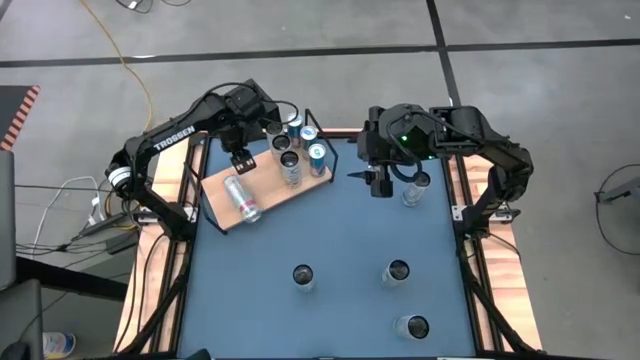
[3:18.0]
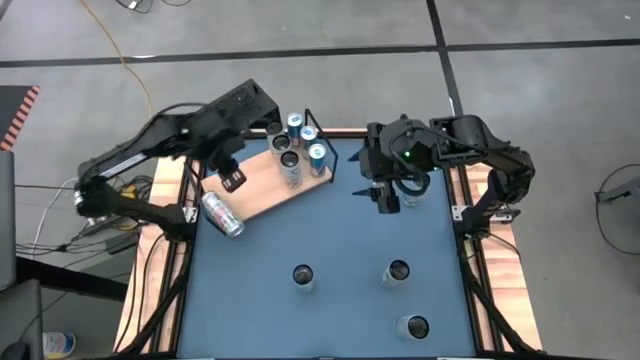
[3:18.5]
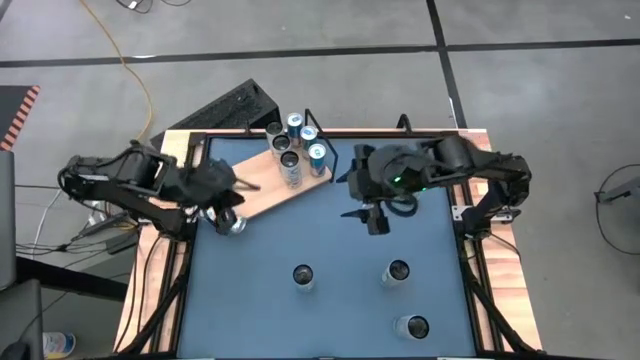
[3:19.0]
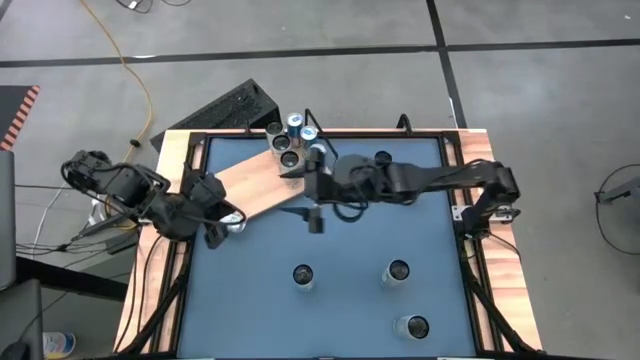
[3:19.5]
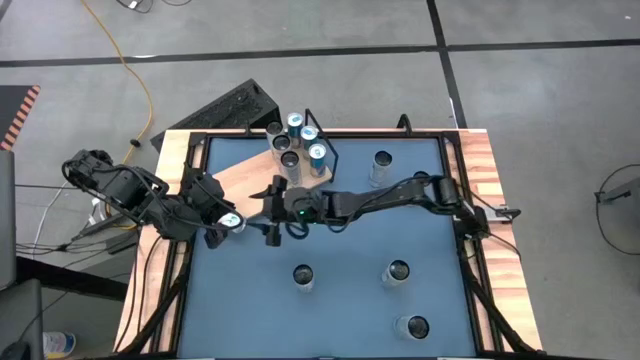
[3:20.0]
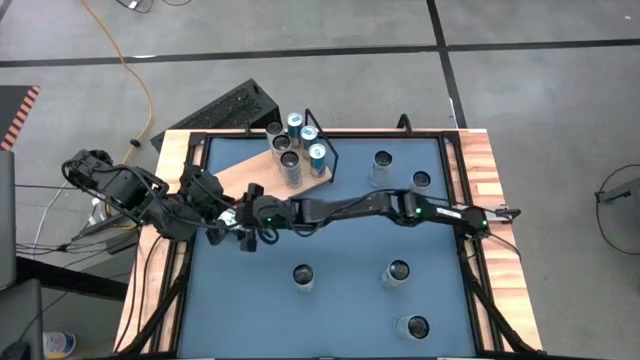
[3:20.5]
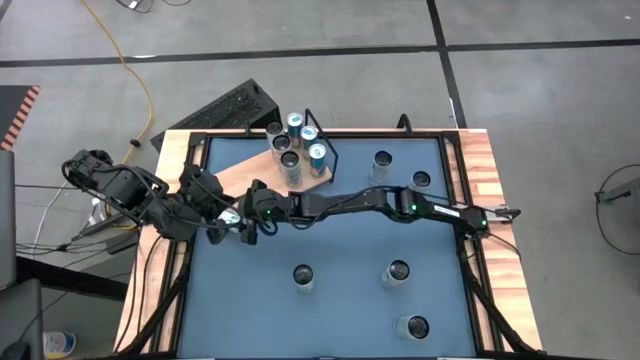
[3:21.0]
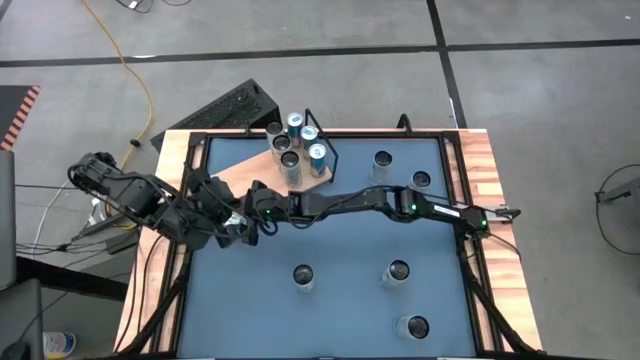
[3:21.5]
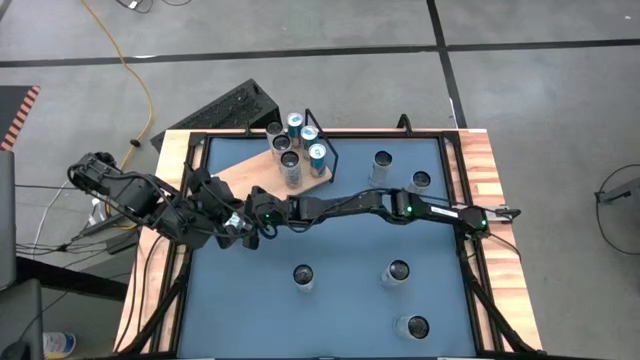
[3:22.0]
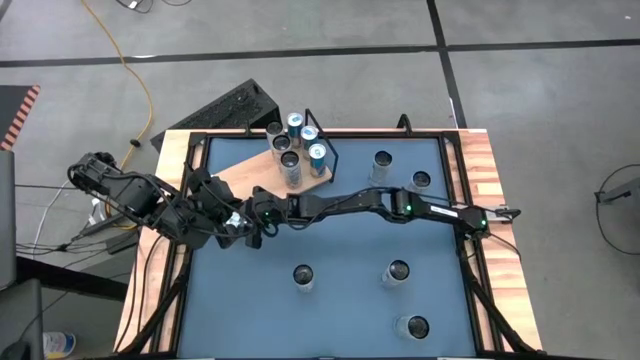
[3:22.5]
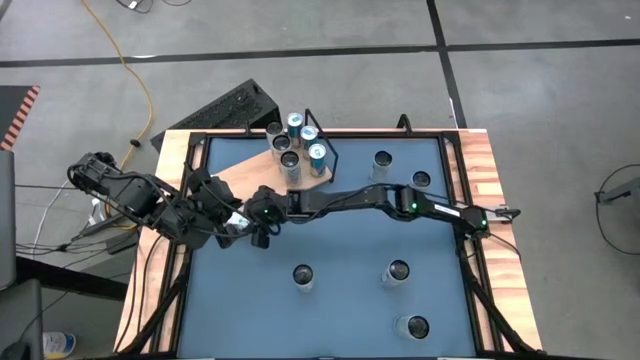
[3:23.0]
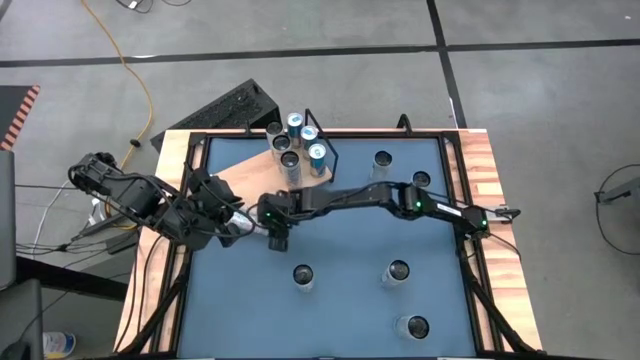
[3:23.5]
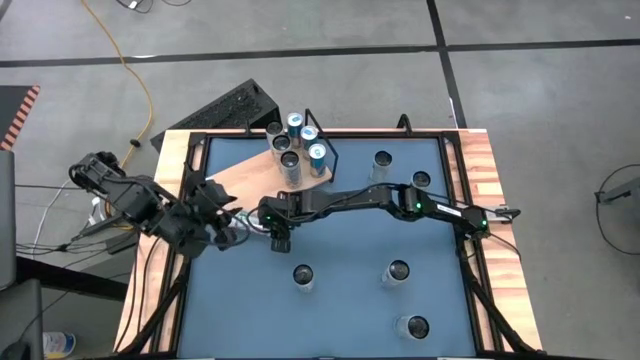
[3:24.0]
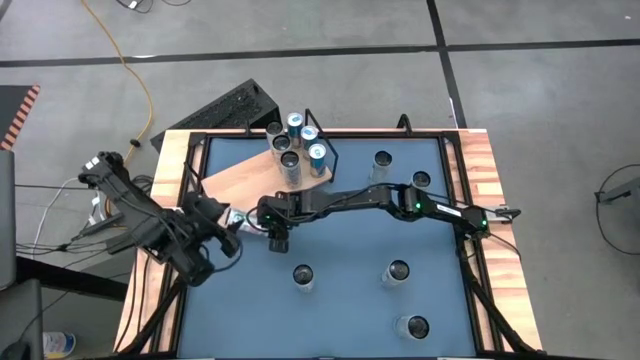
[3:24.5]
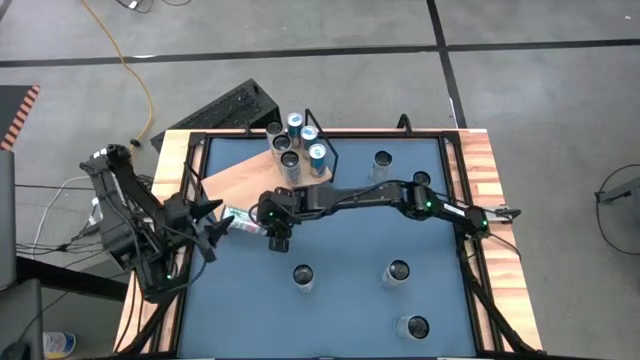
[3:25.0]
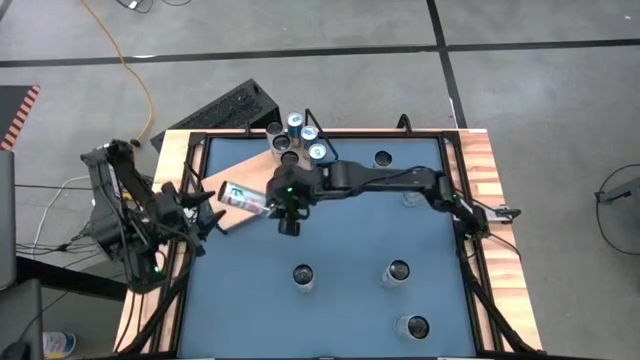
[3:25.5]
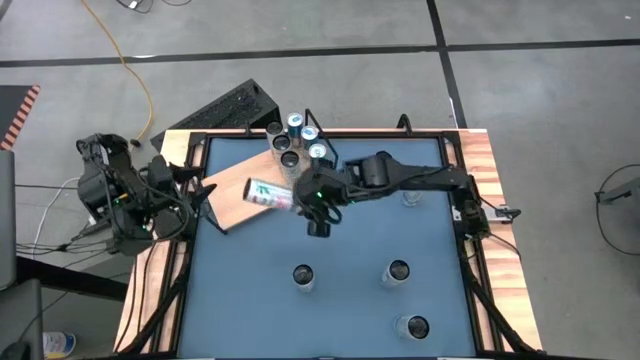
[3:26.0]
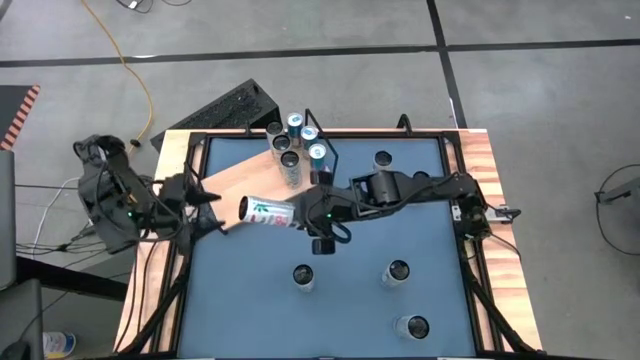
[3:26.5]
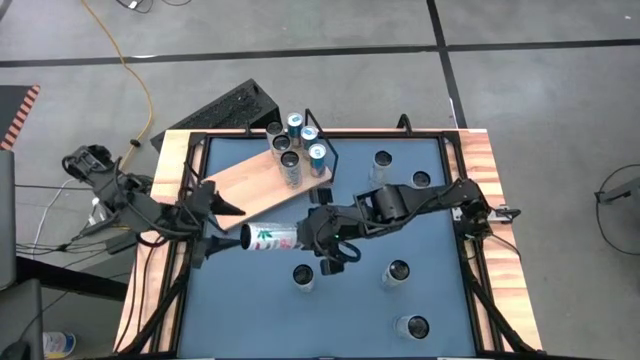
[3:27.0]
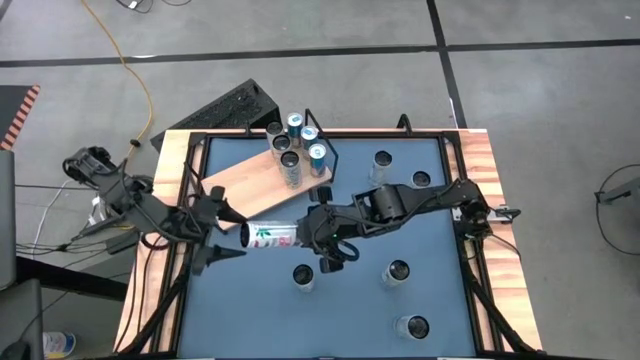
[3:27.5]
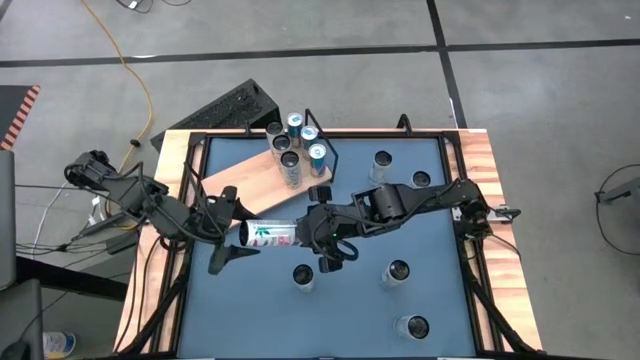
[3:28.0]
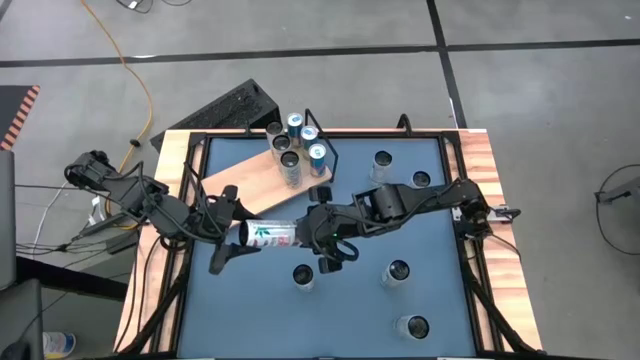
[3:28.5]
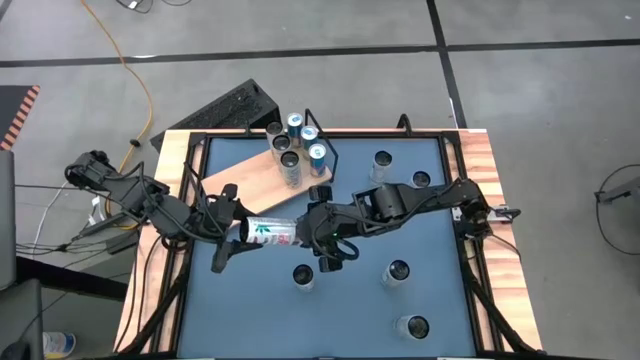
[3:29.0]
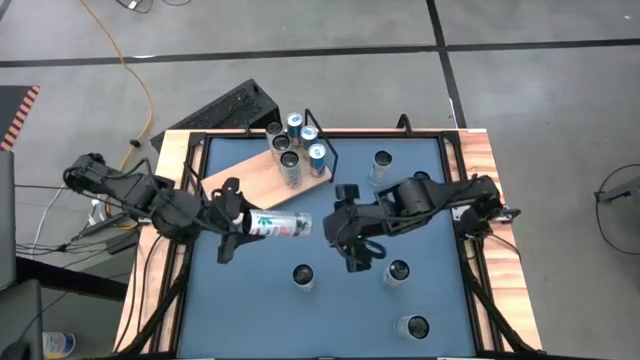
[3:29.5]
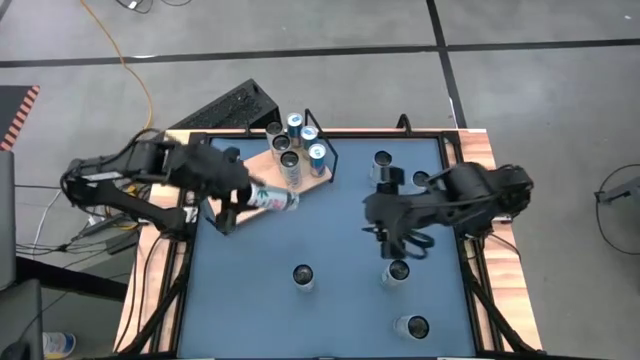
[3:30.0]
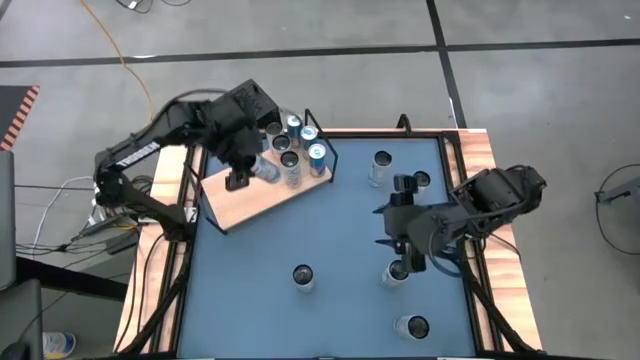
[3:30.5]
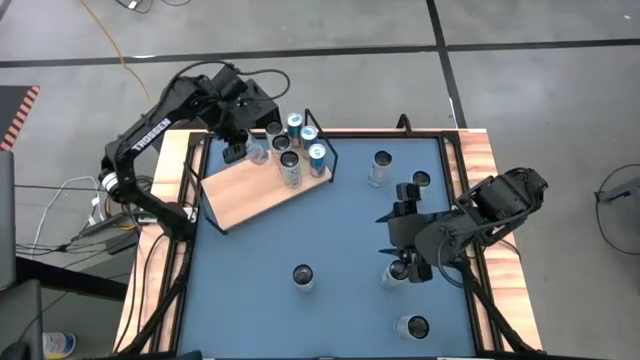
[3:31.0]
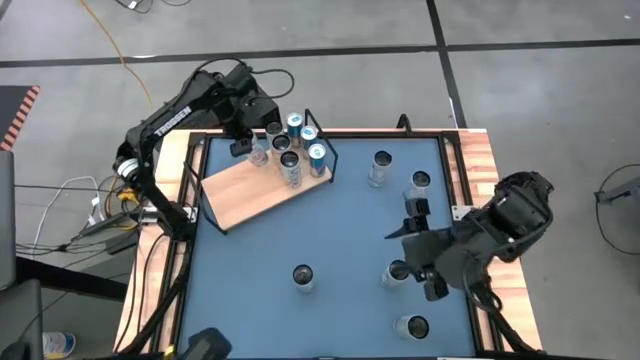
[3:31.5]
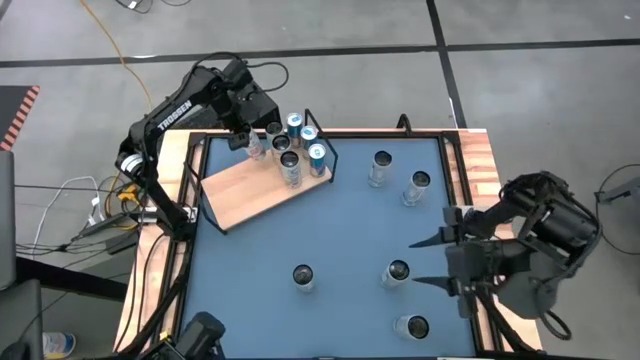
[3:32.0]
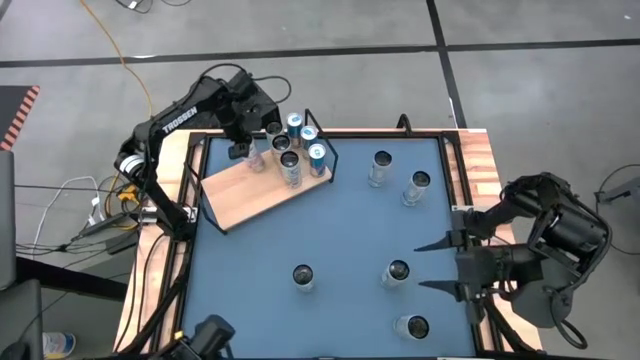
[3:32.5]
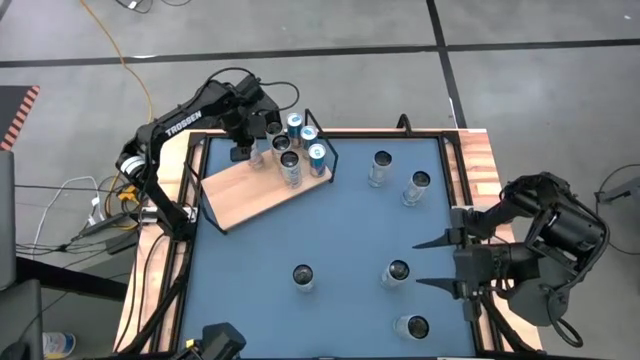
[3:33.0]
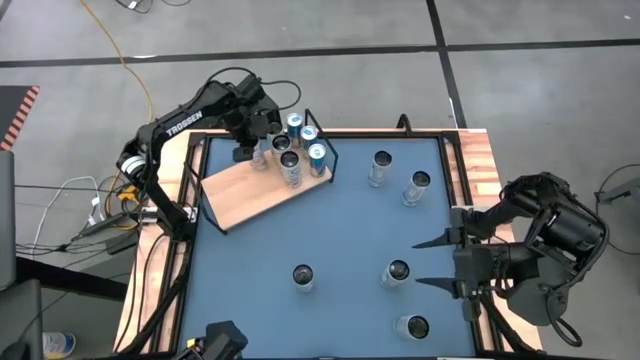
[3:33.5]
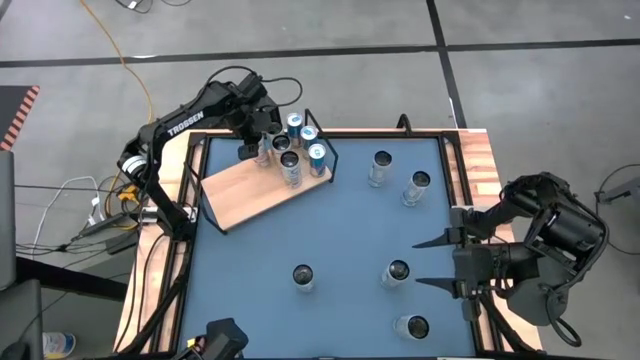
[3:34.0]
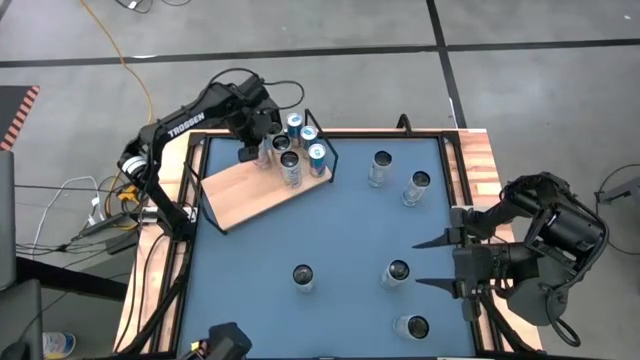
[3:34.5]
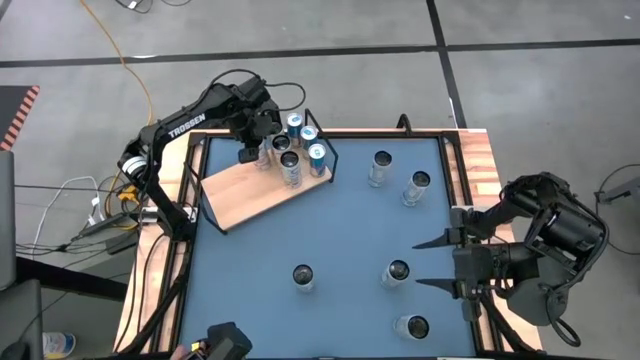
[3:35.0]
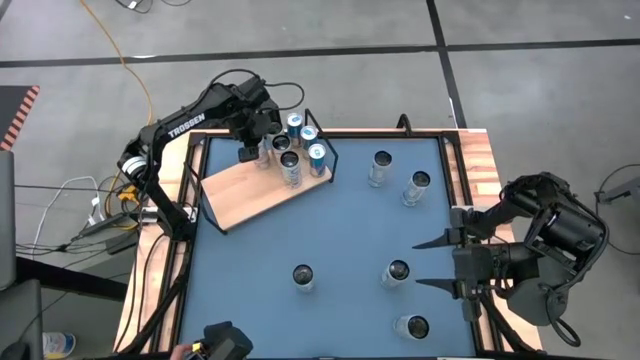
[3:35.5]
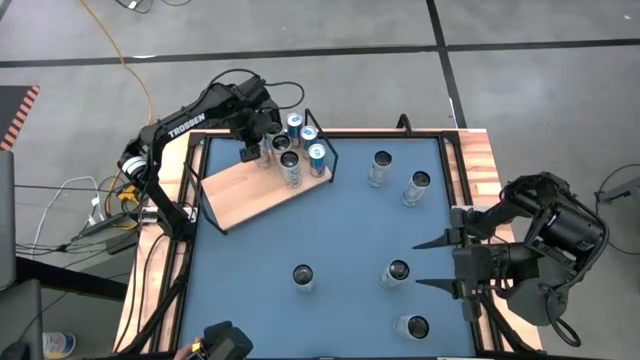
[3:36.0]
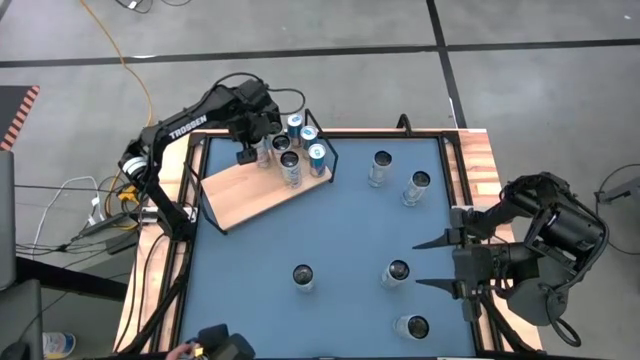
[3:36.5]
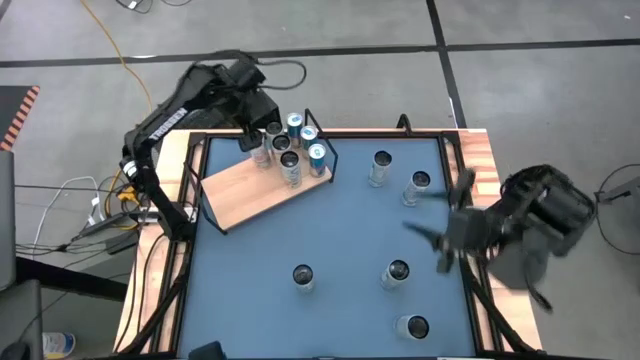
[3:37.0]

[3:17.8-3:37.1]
Task: Place canned beverage on shelf
Put the bottom left white and pink soda can on the shelf
